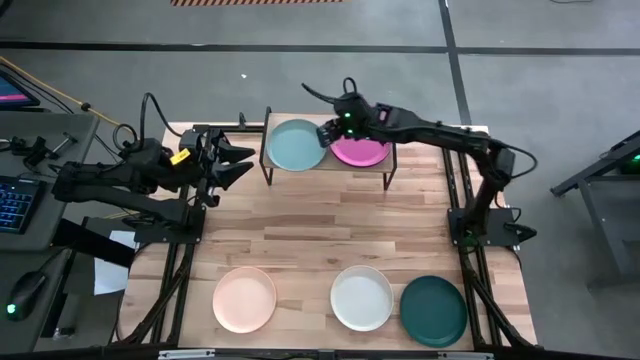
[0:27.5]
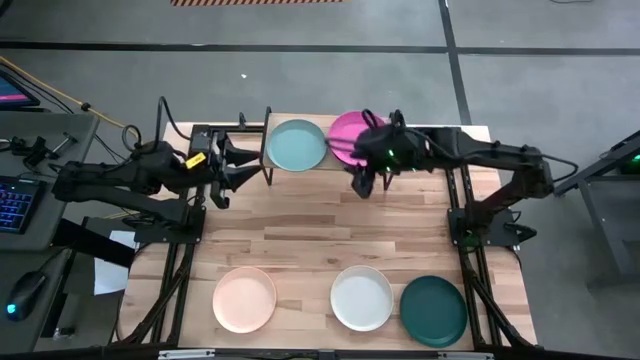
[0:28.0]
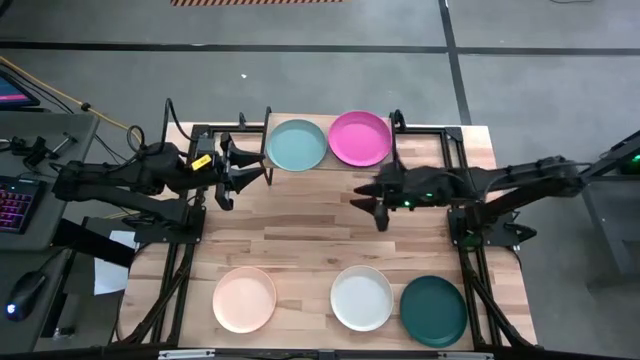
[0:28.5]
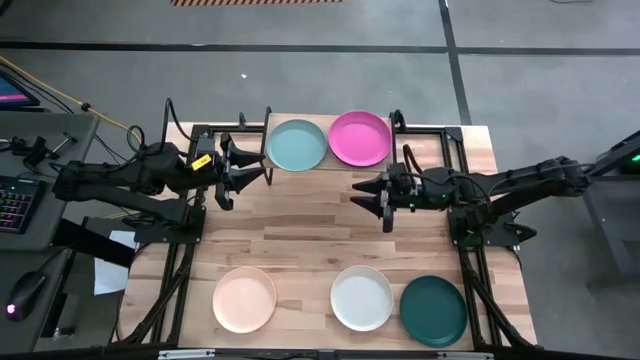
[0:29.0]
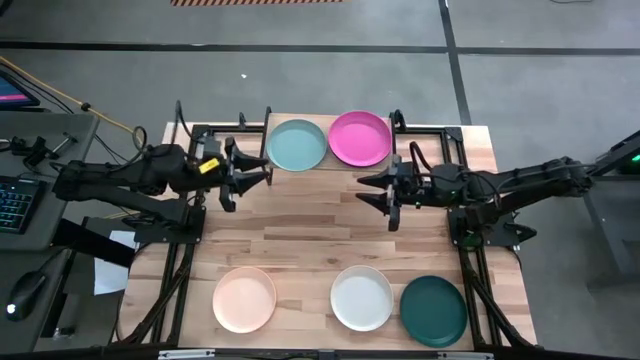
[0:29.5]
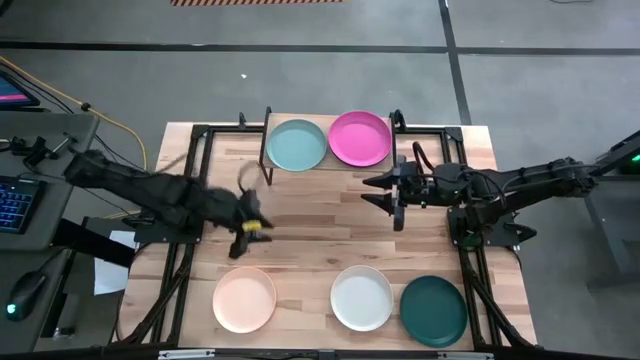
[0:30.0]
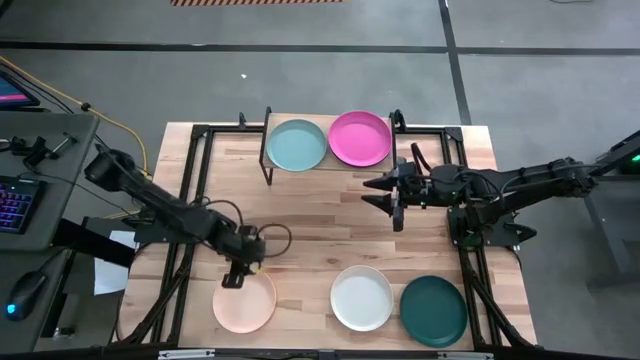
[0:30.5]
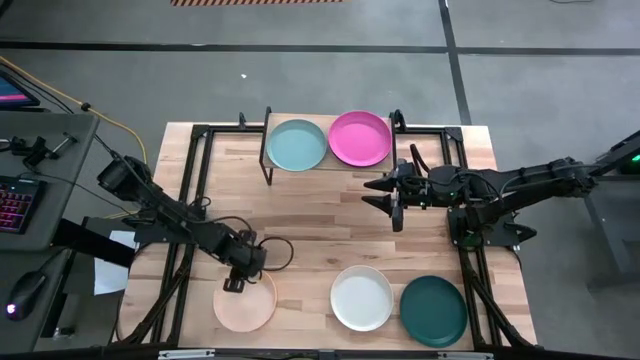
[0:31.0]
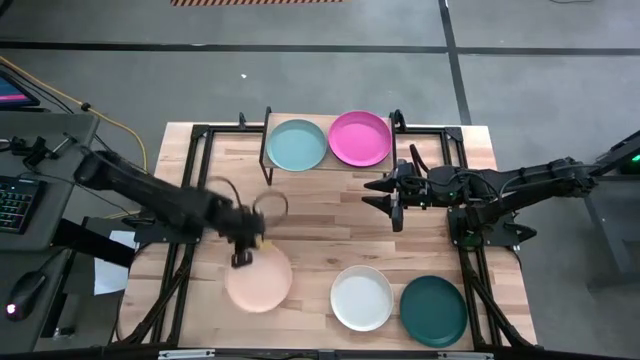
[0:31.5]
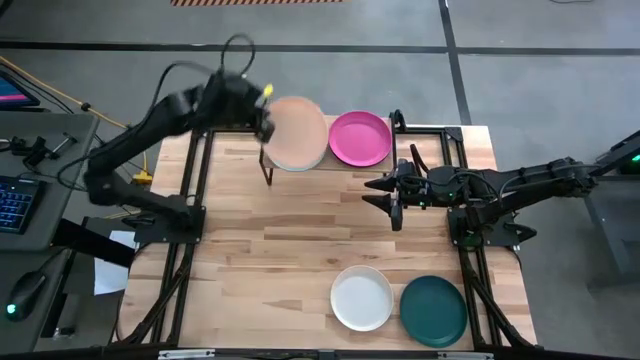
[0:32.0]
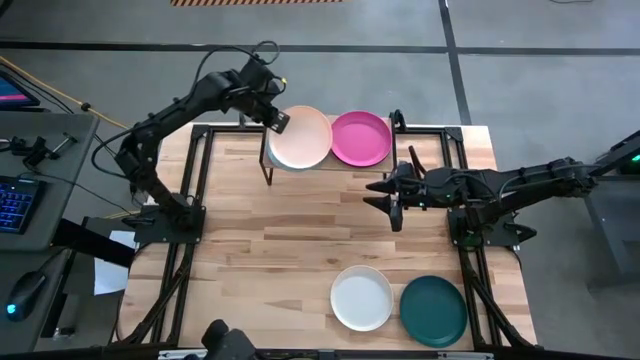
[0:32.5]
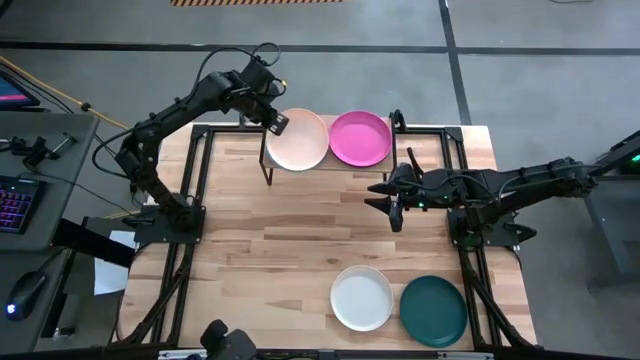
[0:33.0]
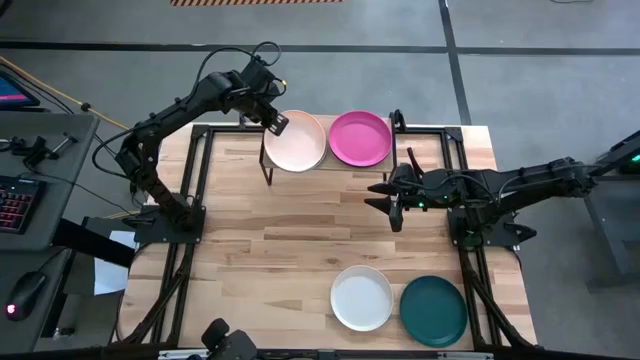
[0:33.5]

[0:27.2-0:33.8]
Task: Place and stack plates onto a shelf
Stack the brown plate on top of the blue plate on the shelf

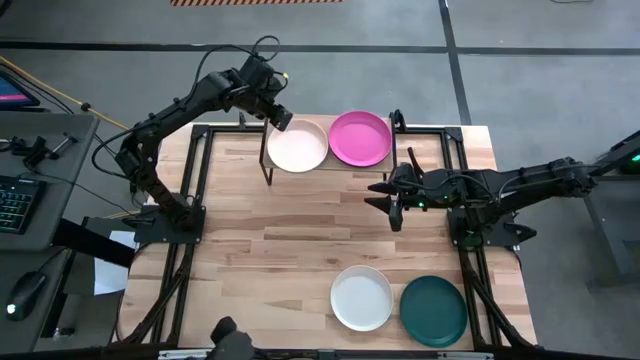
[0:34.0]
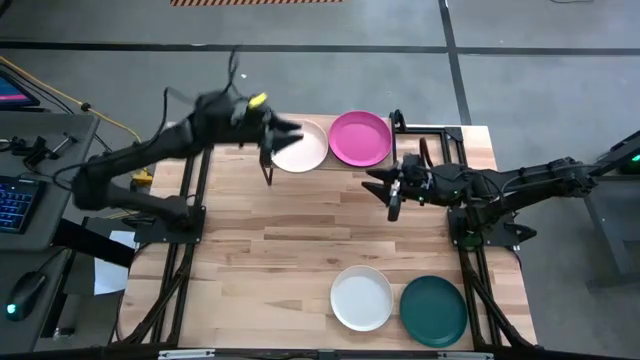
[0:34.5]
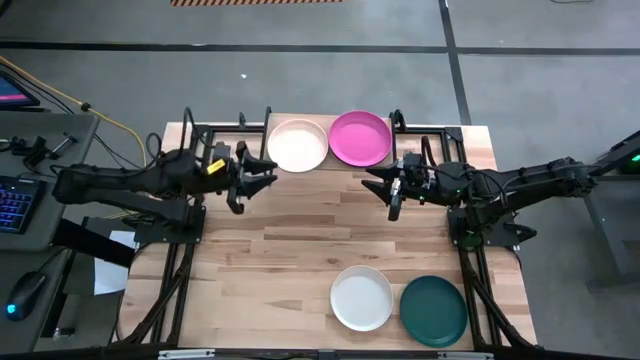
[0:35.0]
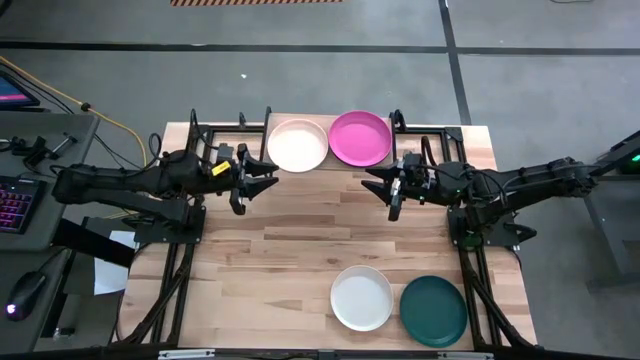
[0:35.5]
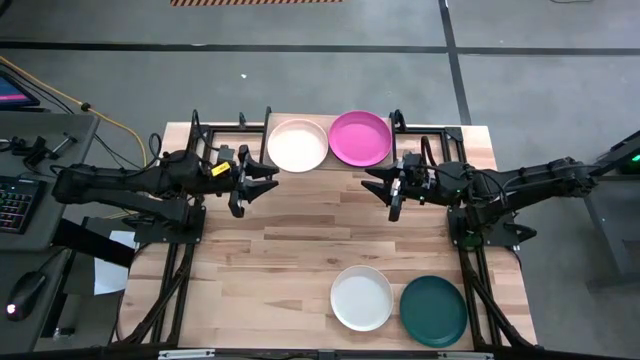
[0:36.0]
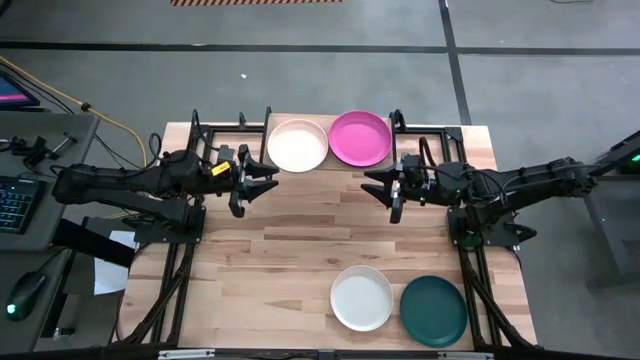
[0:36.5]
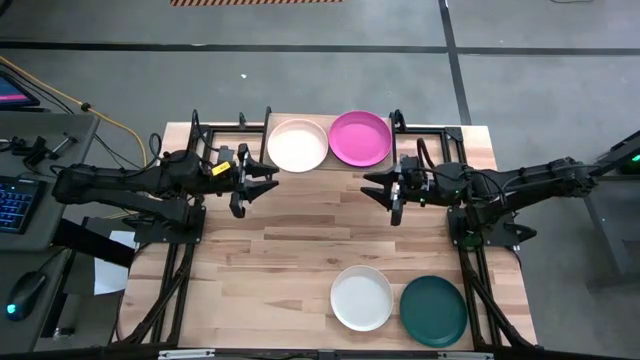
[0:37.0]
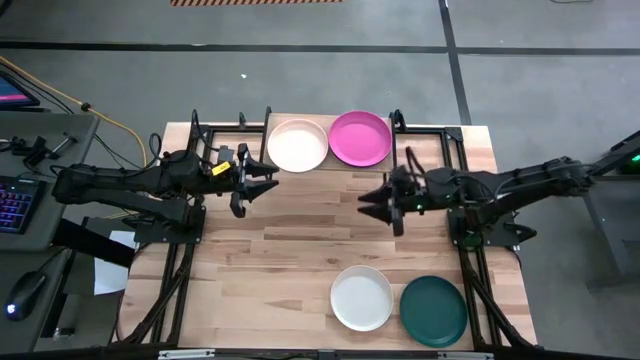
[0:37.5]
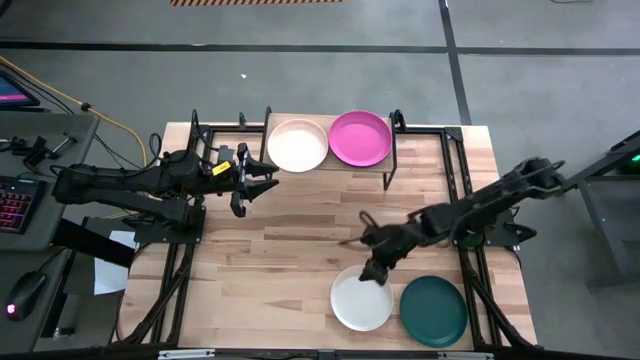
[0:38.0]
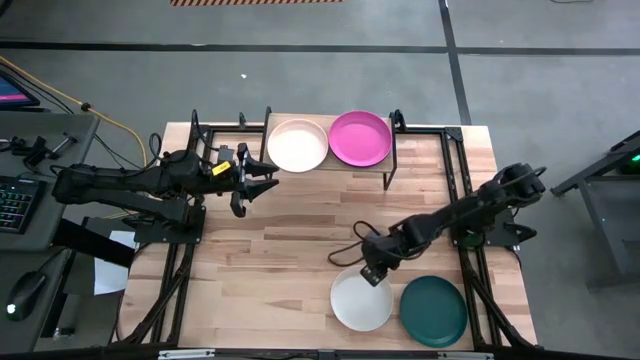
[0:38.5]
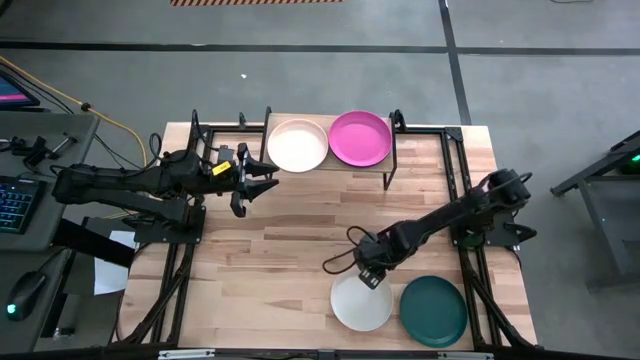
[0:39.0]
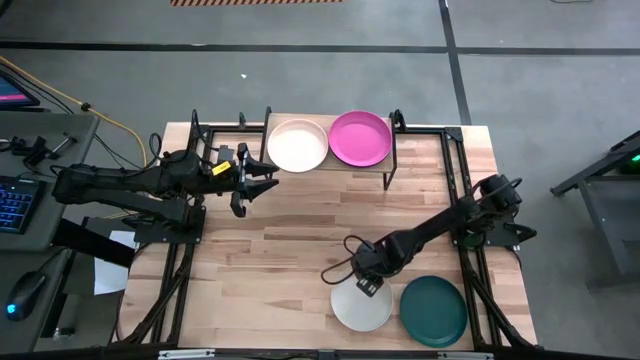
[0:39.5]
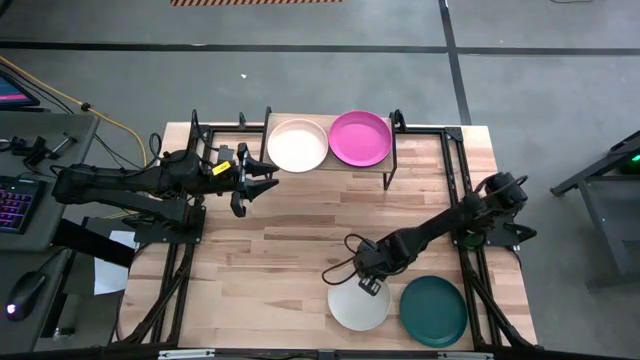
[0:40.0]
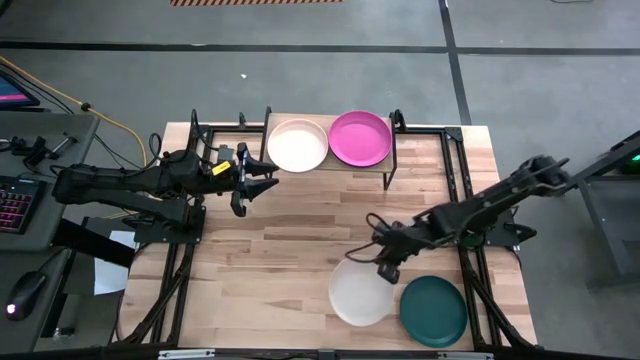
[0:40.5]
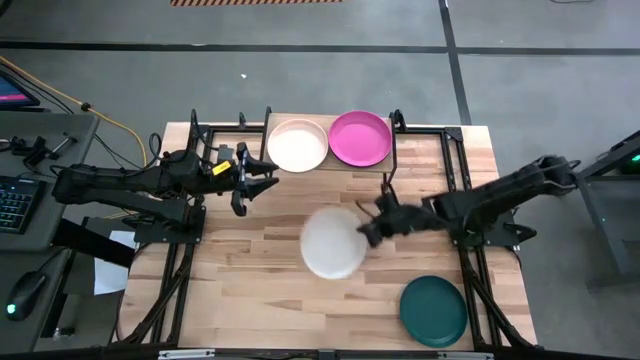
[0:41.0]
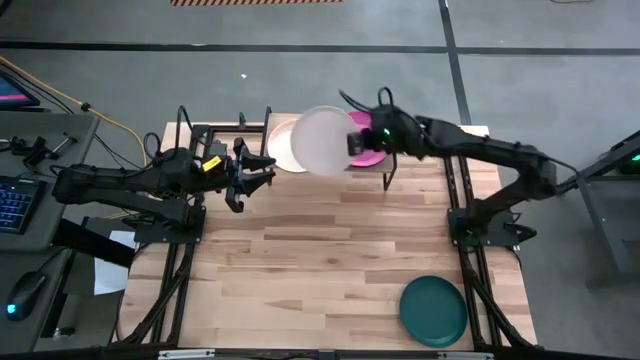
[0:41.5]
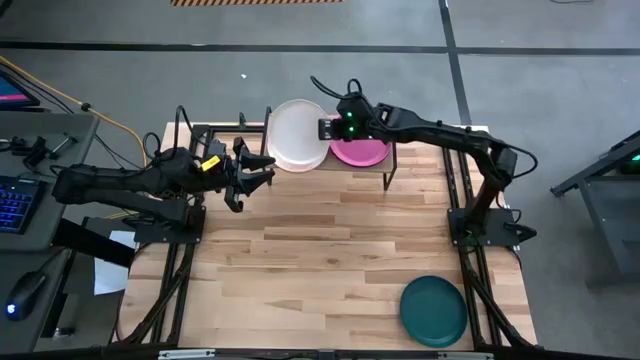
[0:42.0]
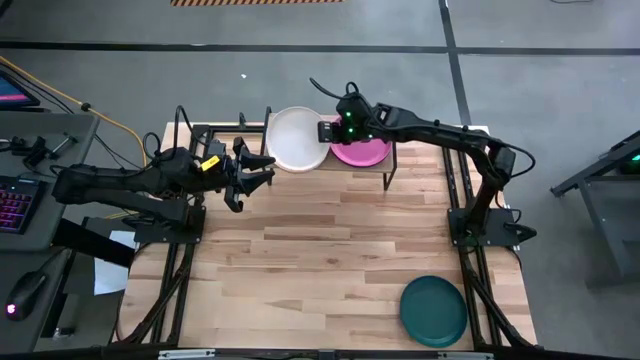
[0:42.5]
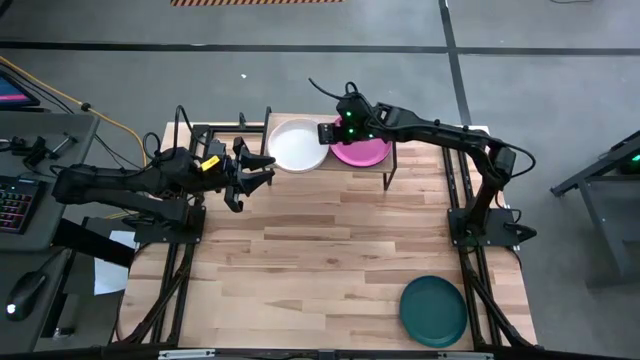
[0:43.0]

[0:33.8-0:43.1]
Stack the white plate on top of the brown plate on the shelf

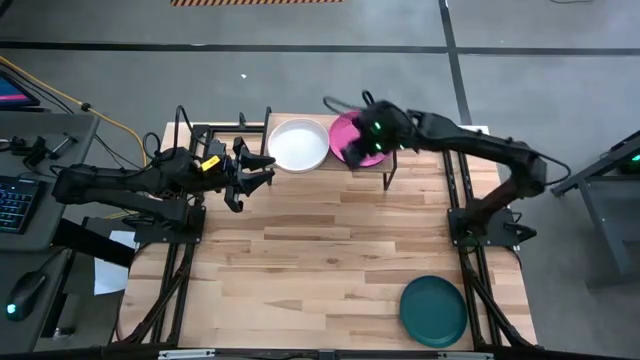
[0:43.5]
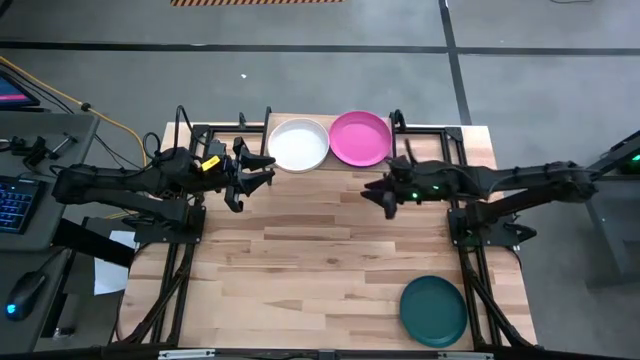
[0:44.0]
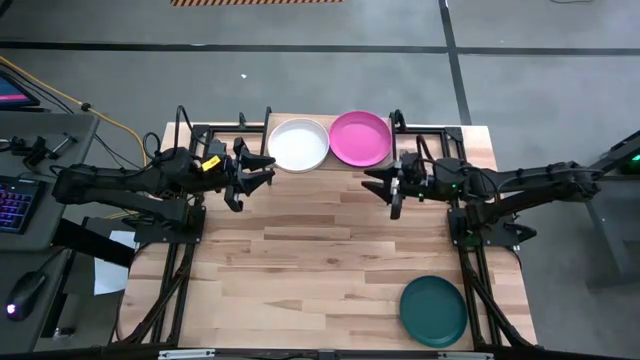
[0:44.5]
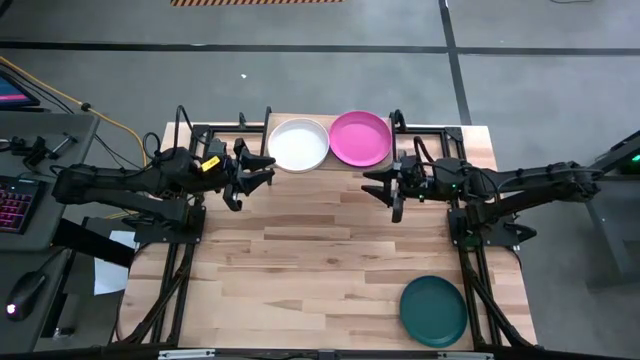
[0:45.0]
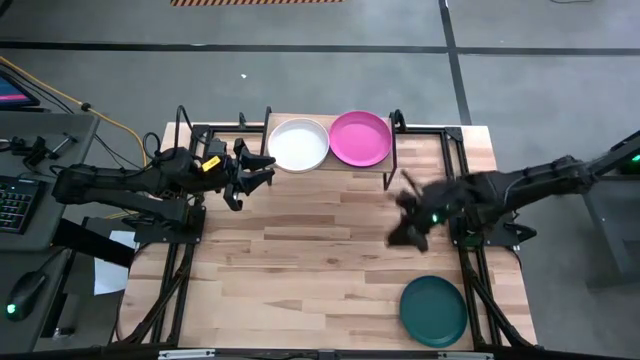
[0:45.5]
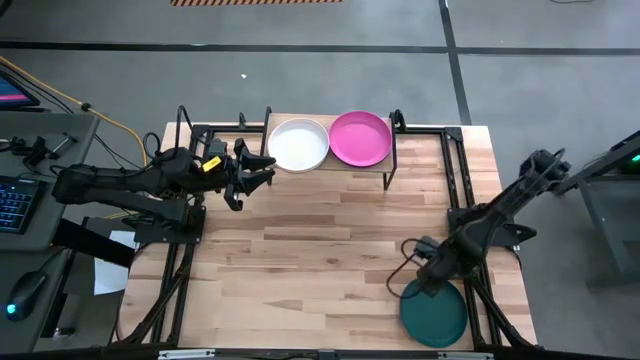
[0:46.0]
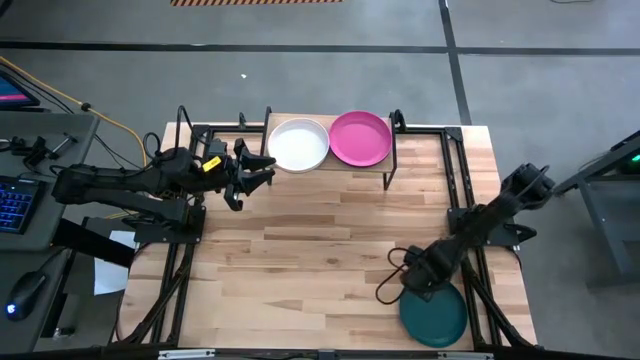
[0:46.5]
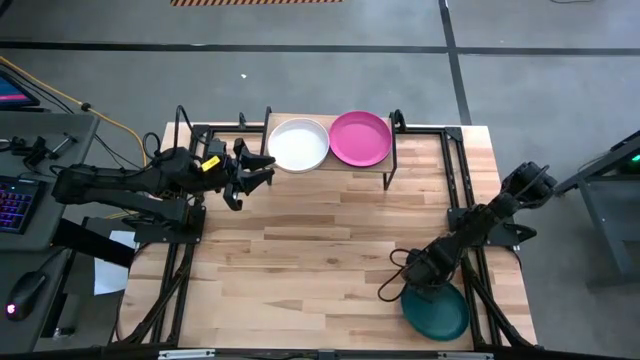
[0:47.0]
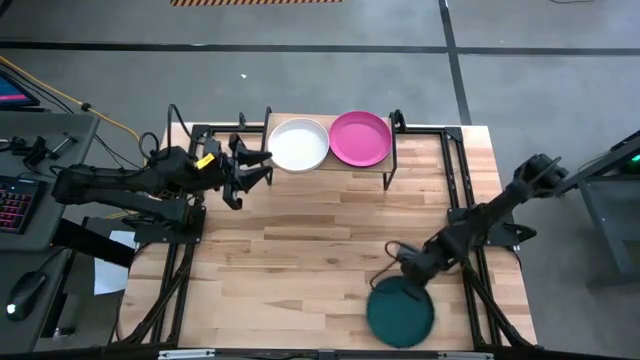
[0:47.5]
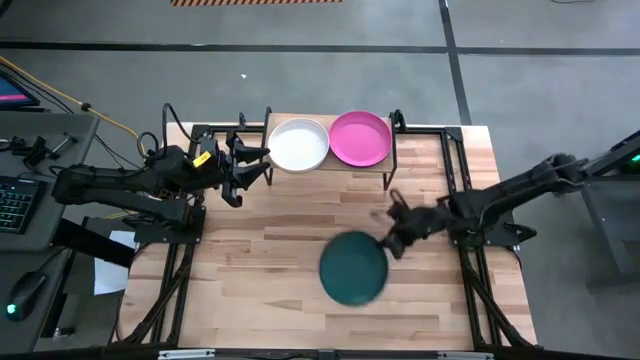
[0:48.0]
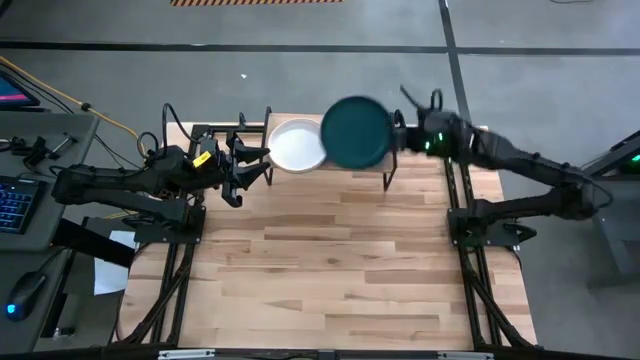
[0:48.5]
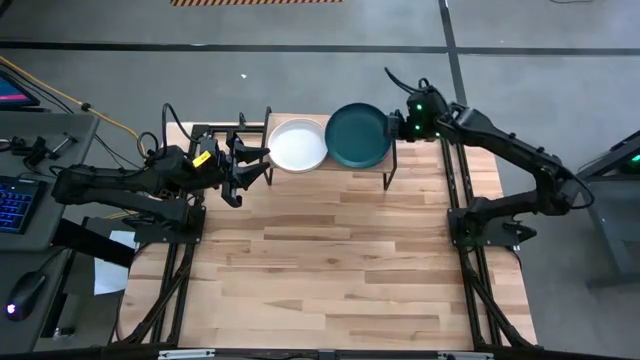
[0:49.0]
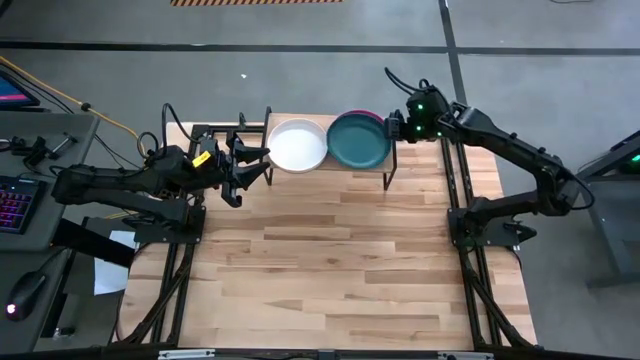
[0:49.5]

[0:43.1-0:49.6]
Stack the blue plate on top of the pink plate on the shelf
